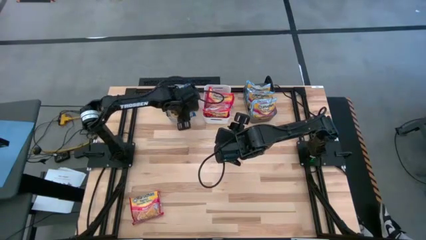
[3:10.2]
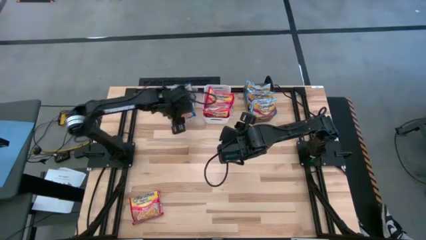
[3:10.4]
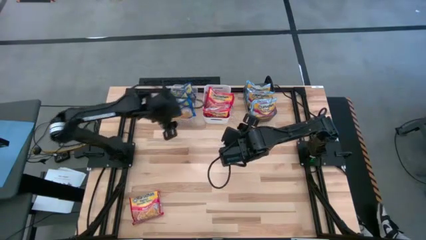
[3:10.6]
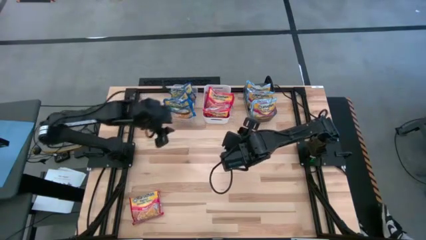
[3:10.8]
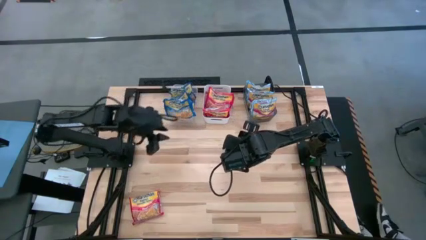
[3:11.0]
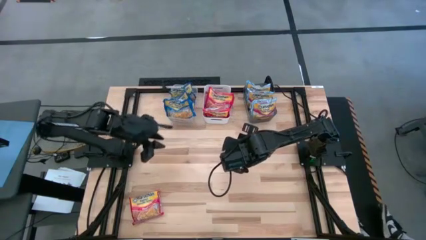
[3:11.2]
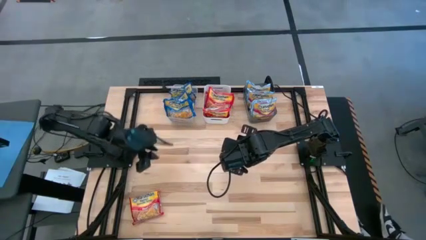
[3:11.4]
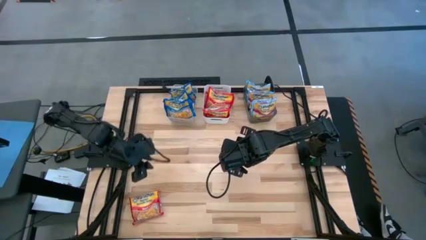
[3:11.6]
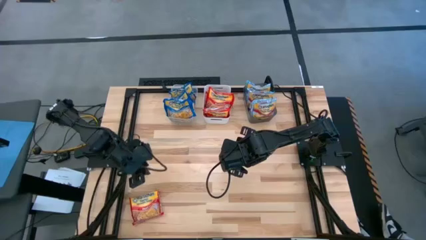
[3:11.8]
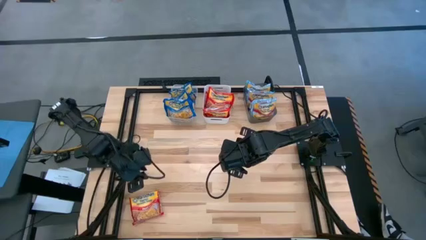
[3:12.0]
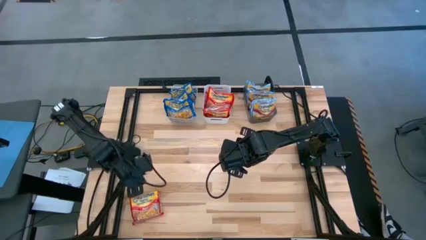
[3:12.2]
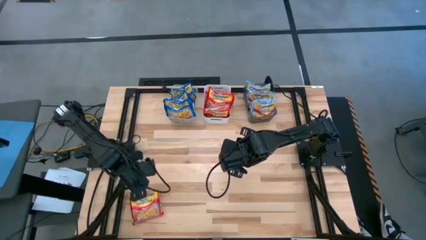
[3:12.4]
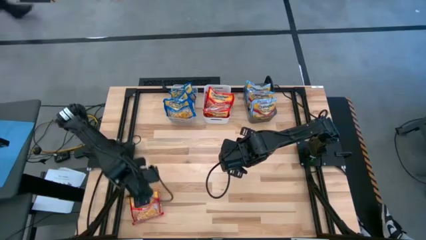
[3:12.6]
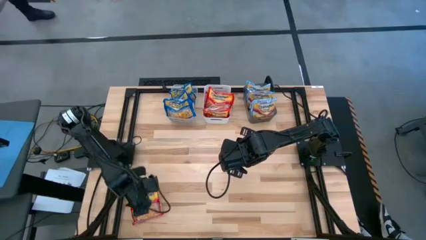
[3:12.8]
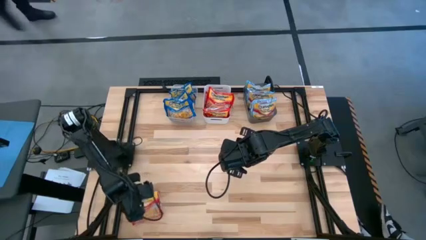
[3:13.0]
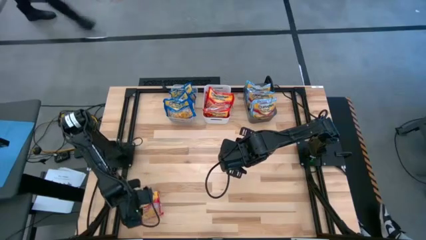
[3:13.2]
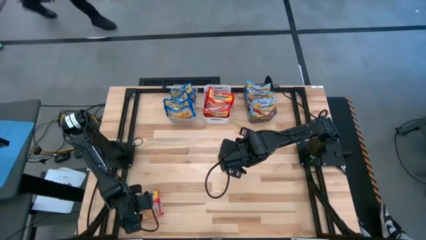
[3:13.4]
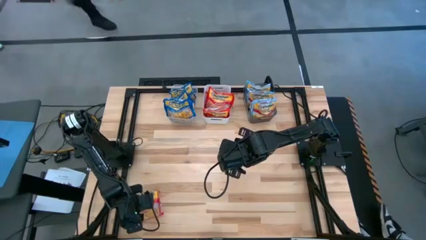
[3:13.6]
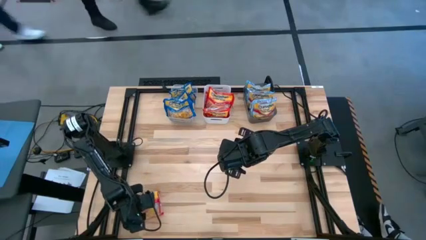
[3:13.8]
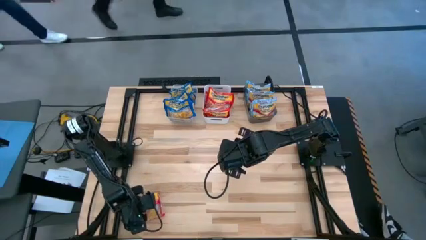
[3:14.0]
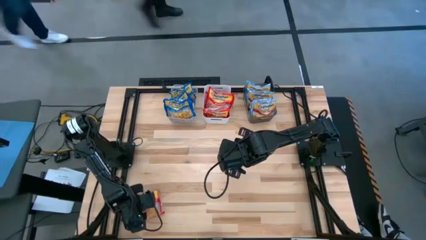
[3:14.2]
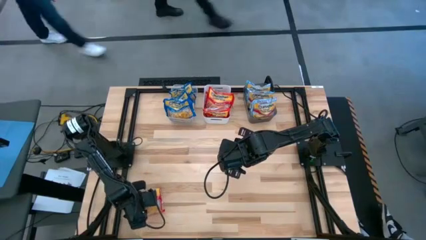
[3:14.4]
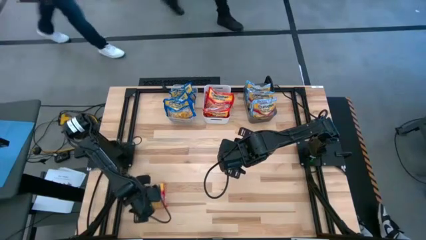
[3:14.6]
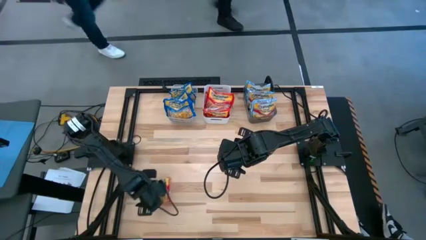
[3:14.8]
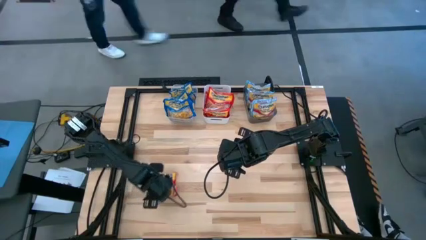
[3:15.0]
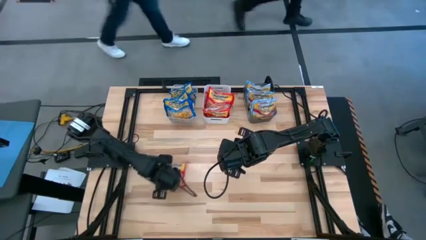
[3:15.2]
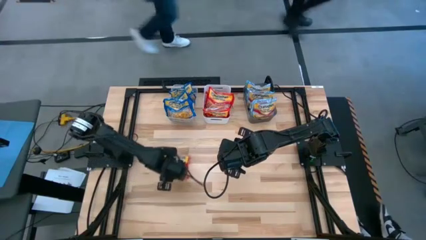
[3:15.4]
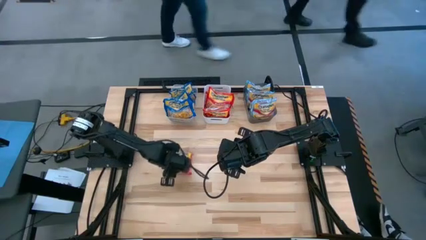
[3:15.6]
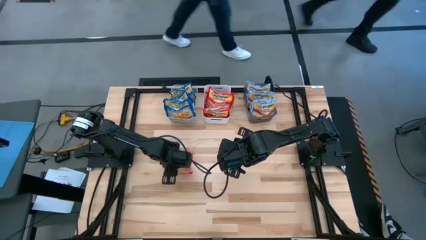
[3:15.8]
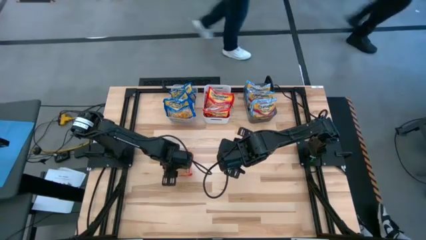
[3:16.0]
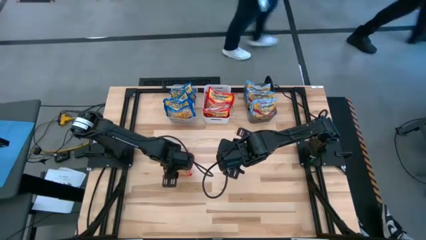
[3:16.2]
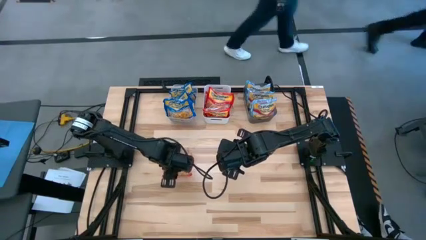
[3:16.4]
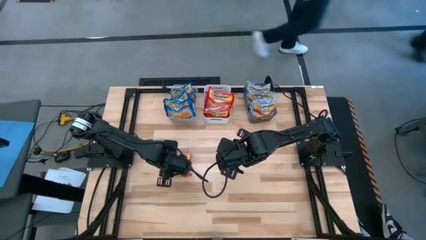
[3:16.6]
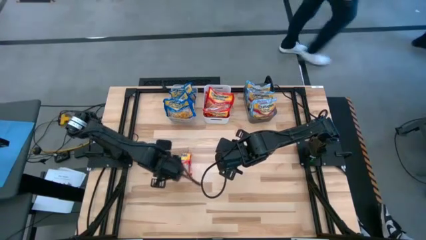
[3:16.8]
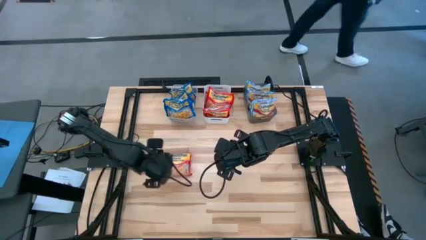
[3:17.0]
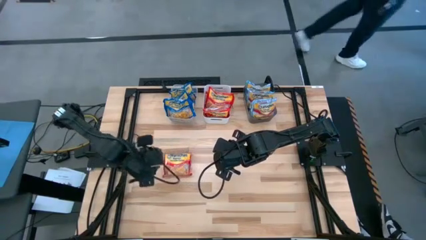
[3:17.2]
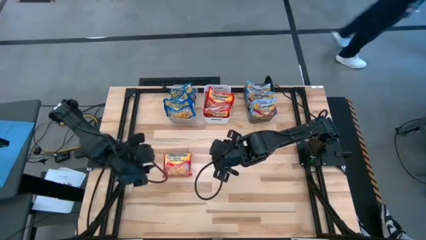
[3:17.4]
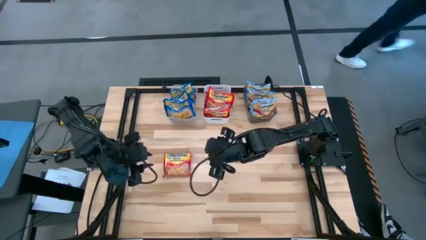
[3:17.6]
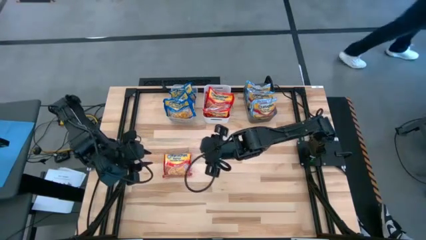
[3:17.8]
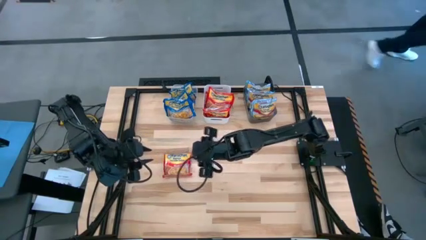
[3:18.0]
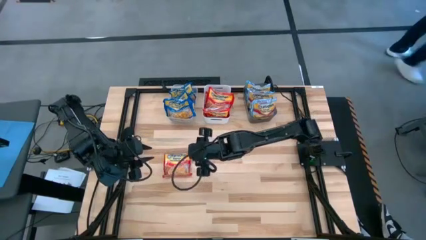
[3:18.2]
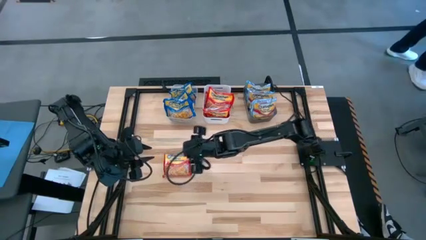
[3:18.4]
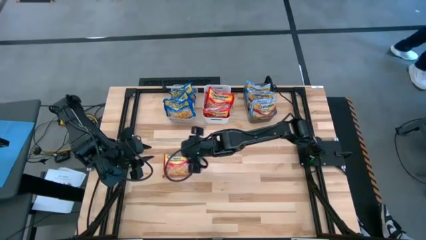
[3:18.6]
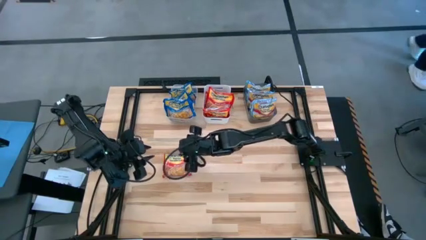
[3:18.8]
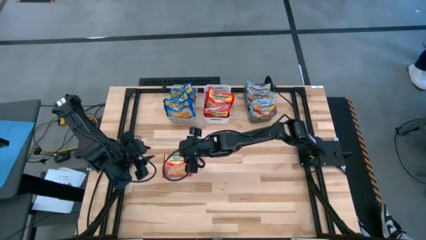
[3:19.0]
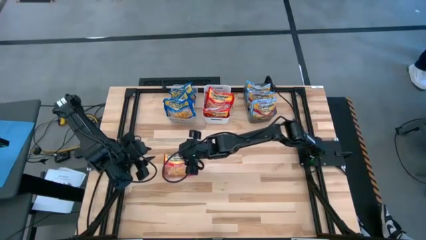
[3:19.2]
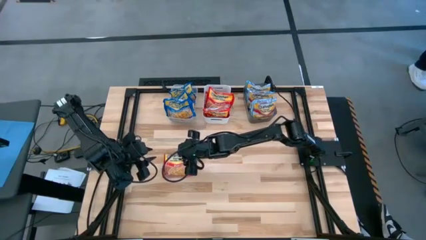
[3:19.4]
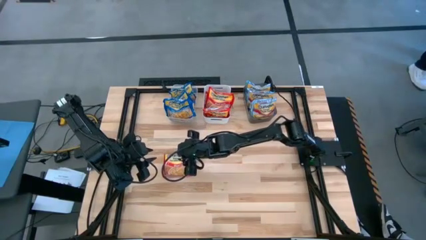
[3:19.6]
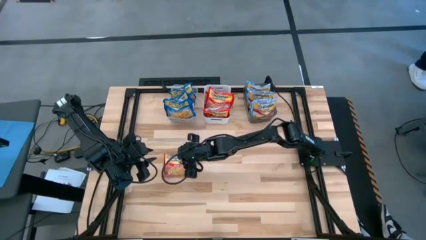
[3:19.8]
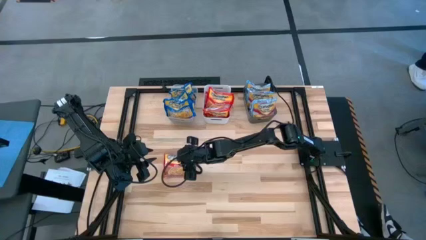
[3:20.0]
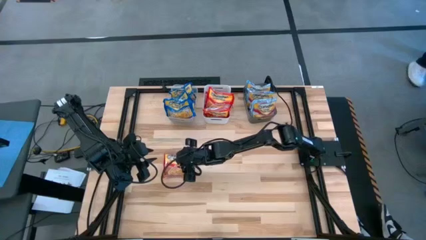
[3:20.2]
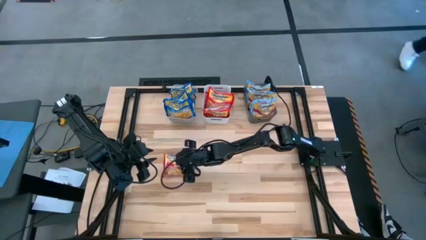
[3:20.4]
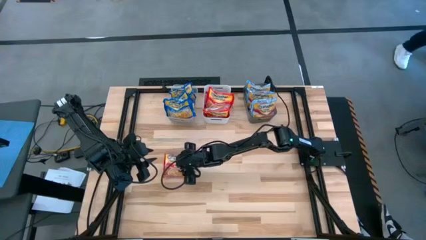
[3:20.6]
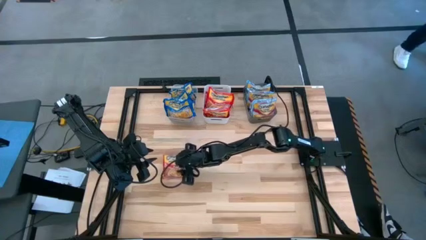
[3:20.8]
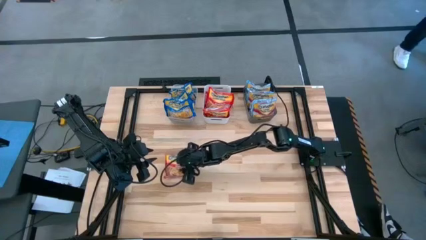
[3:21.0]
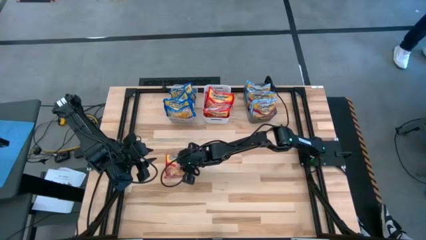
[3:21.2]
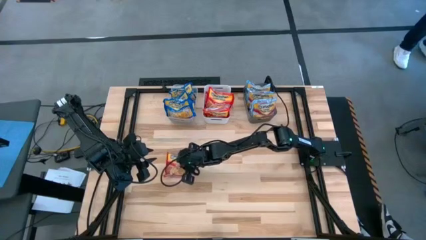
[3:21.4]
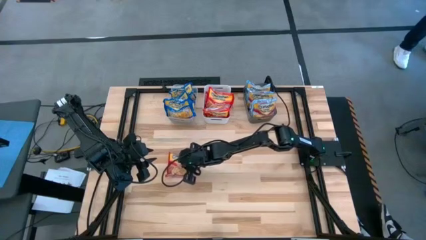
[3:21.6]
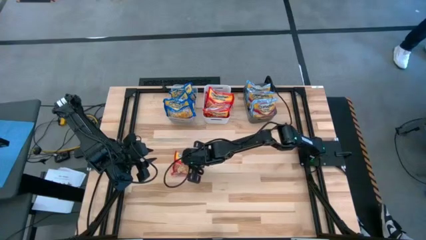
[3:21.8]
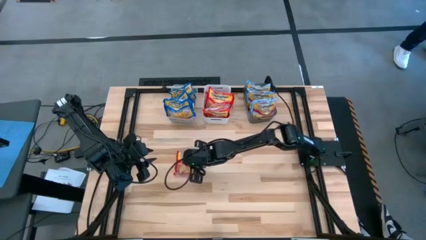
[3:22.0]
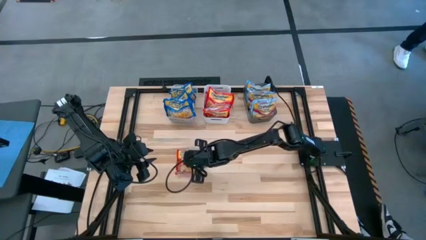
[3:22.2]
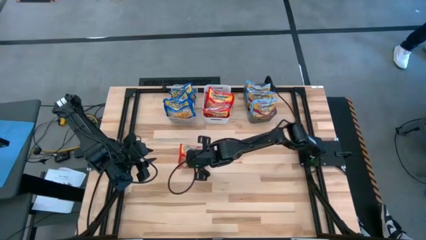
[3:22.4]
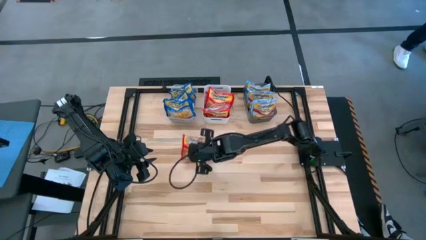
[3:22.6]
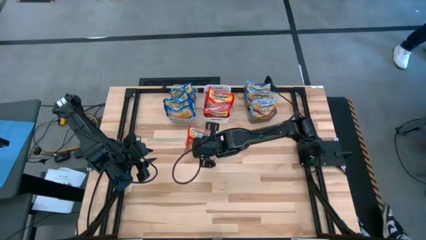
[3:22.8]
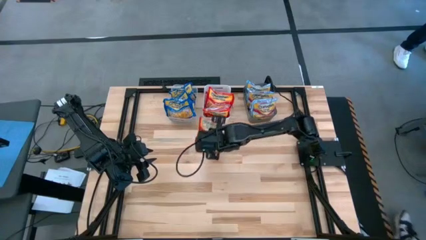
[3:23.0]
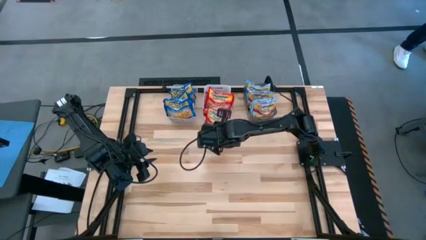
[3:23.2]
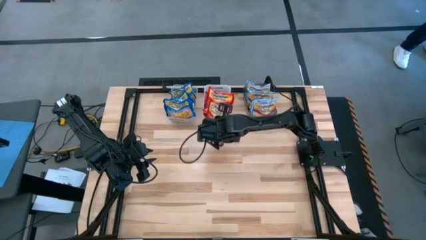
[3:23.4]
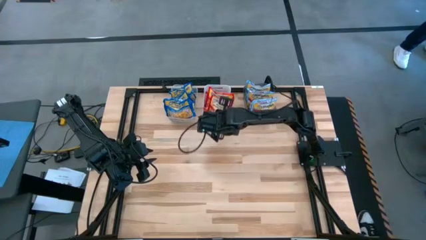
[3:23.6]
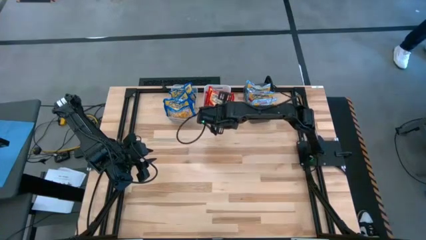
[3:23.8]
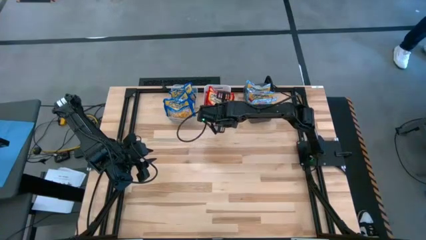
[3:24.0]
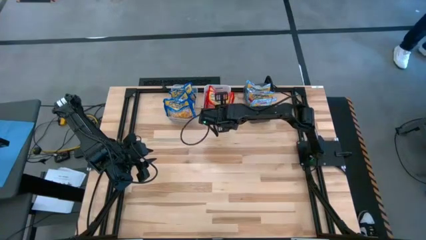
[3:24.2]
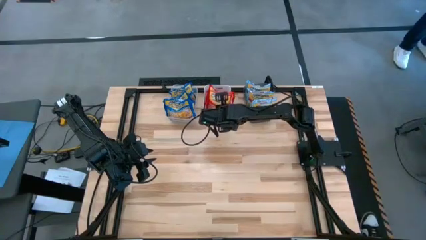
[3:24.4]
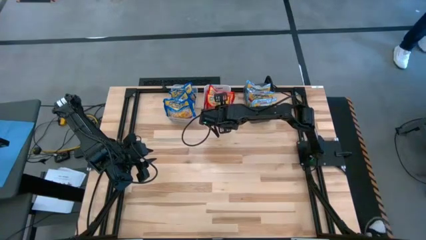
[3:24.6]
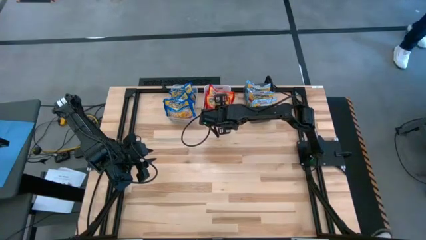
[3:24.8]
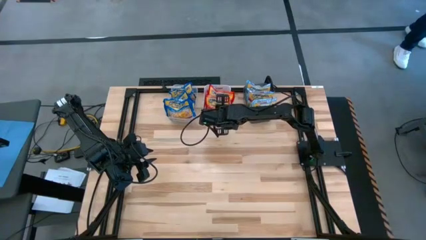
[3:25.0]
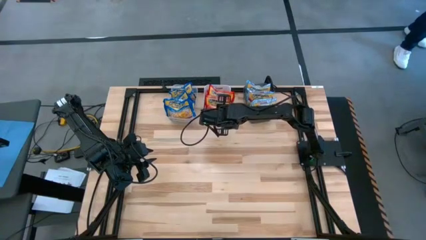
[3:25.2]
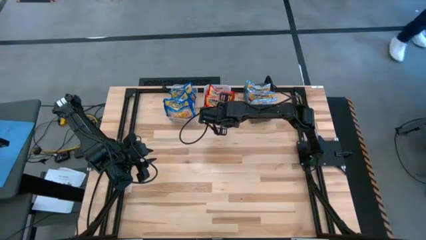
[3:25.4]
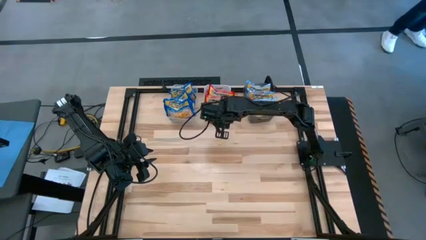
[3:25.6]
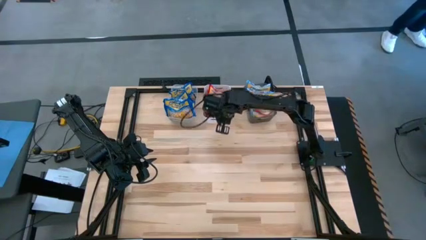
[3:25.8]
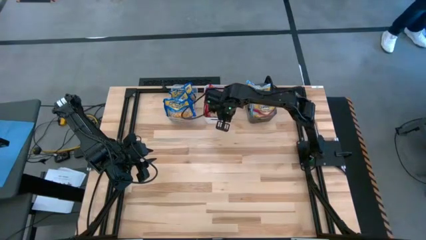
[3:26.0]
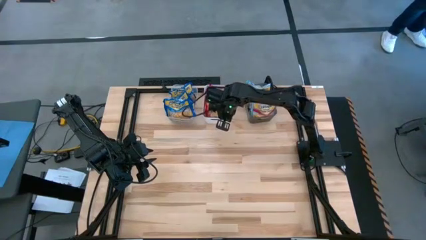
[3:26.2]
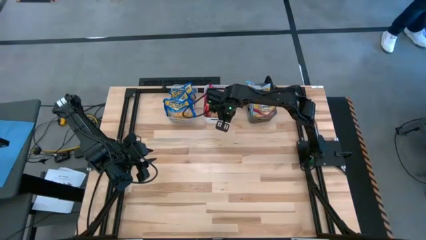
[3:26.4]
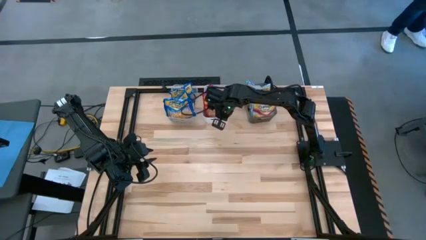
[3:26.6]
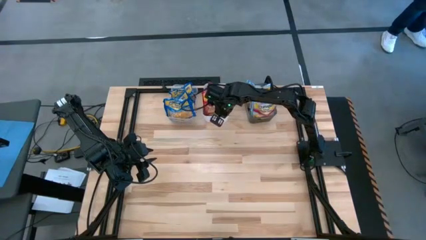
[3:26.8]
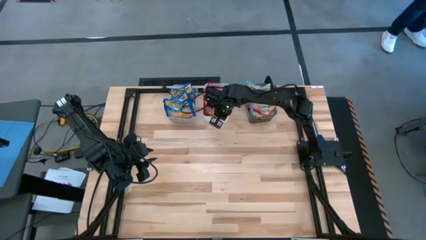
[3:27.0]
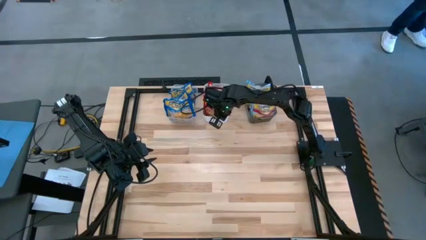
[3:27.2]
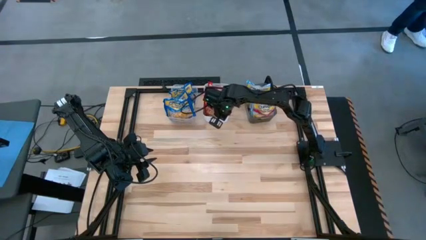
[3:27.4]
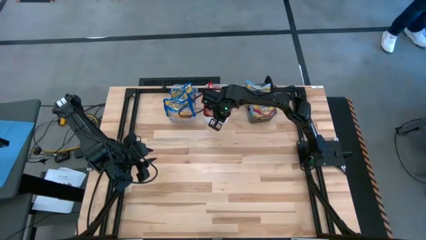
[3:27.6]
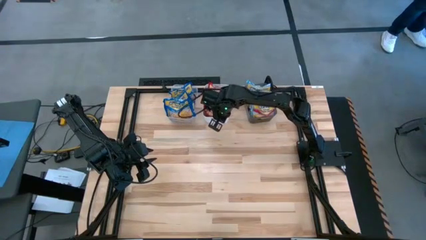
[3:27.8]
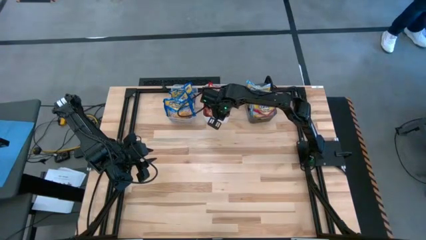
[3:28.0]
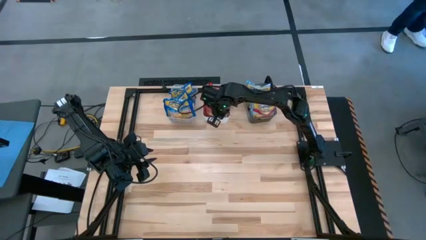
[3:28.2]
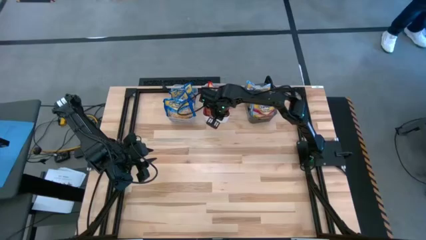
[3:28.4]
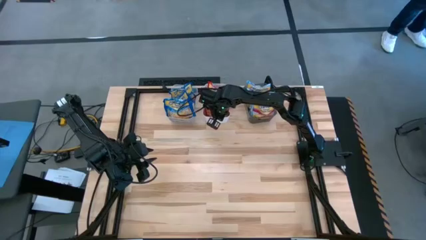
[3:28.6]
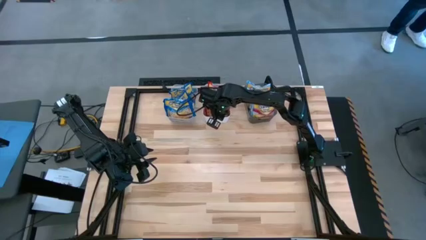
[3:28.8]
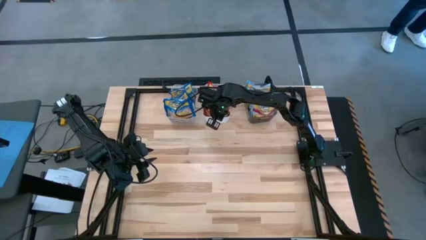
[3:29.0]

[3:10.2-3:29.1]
Task: Sort Maruchan noodles
Put the red noodle pack into the white bin
